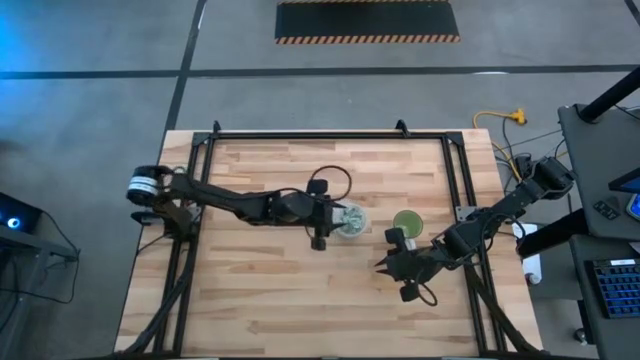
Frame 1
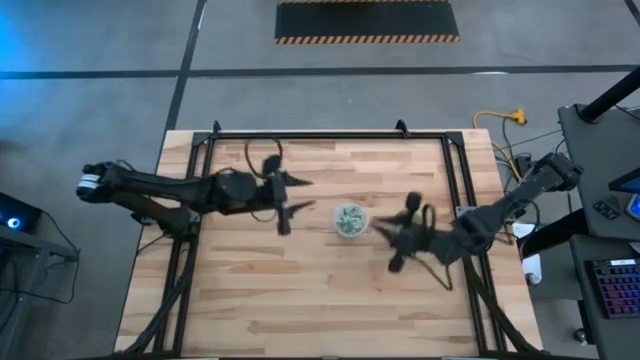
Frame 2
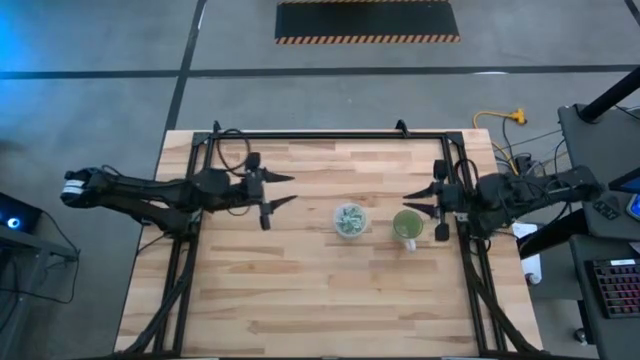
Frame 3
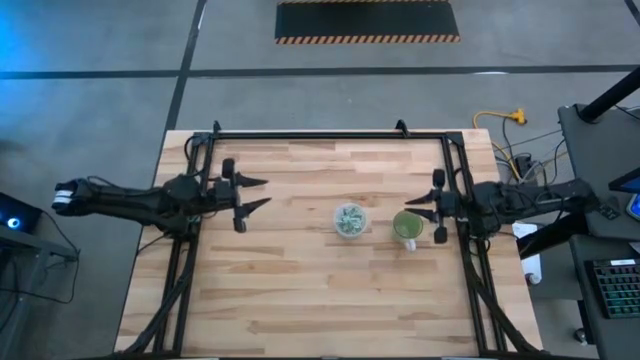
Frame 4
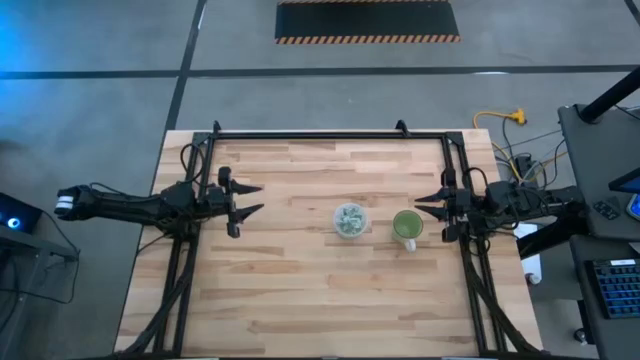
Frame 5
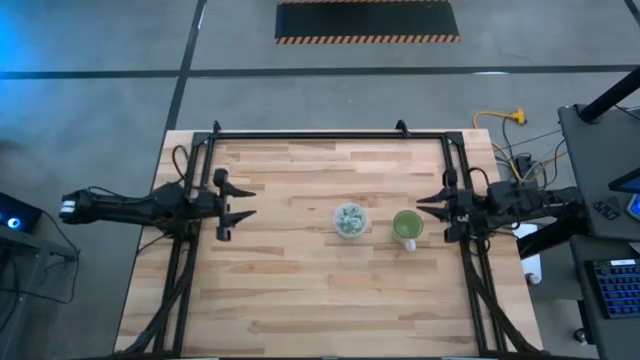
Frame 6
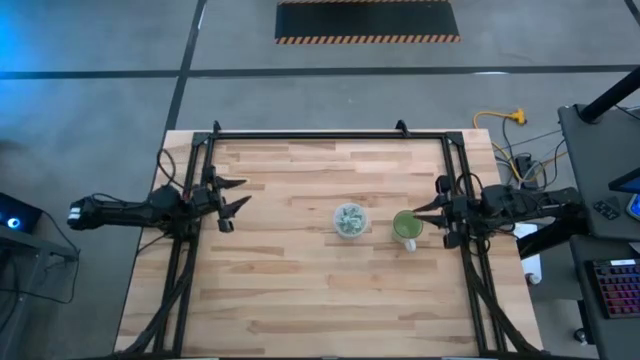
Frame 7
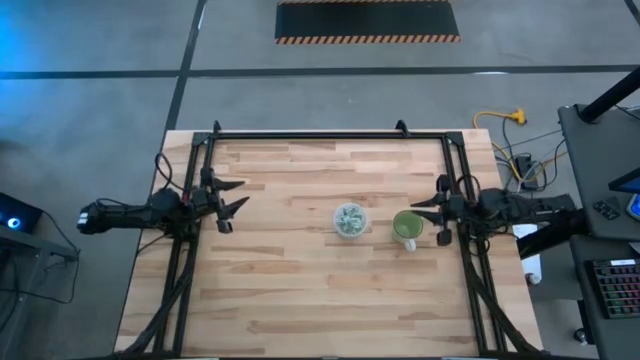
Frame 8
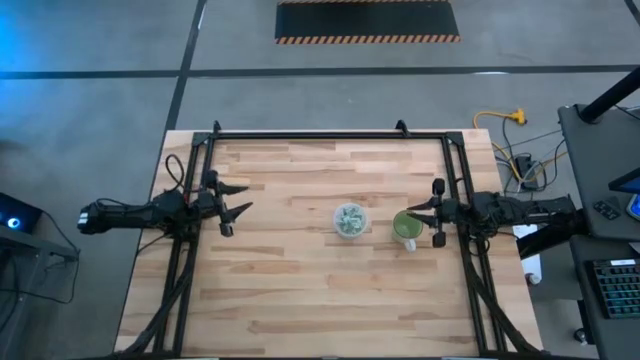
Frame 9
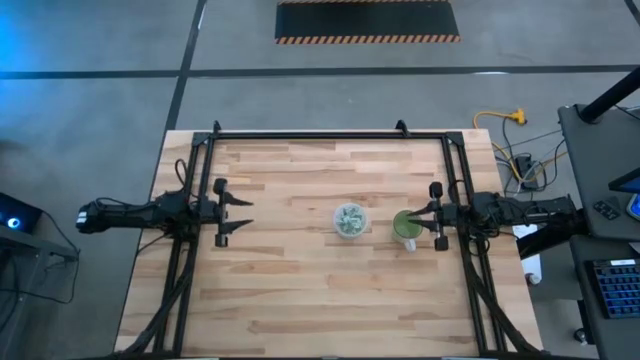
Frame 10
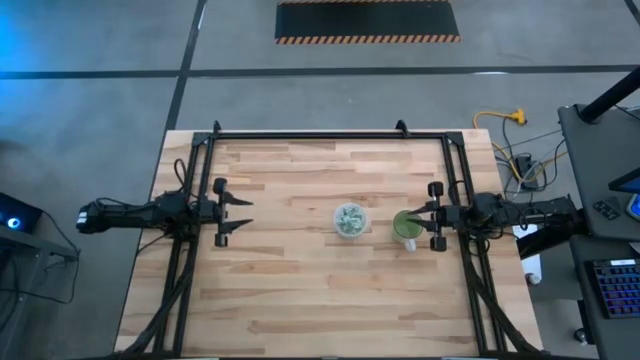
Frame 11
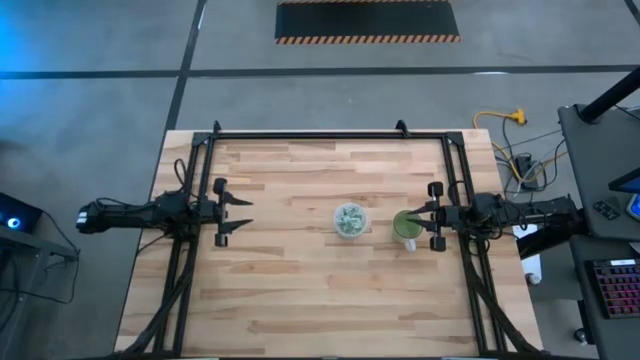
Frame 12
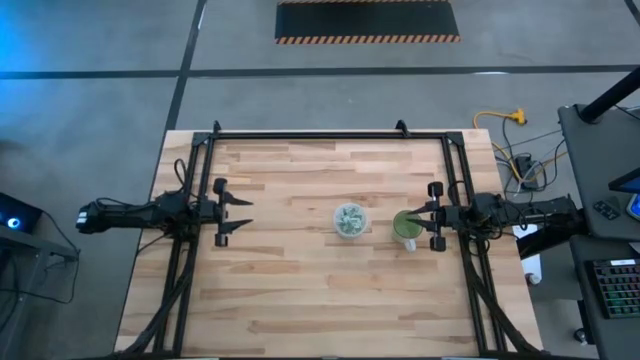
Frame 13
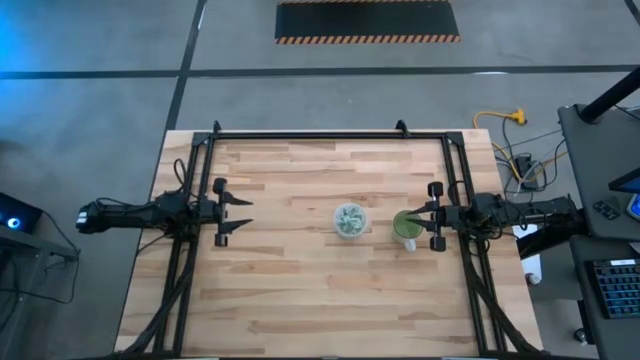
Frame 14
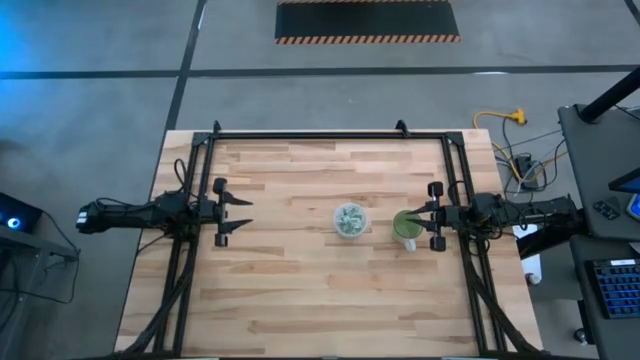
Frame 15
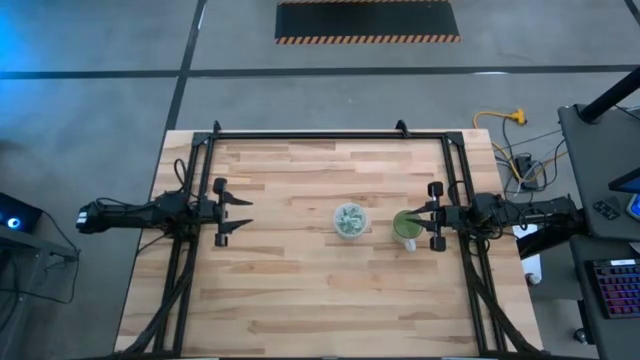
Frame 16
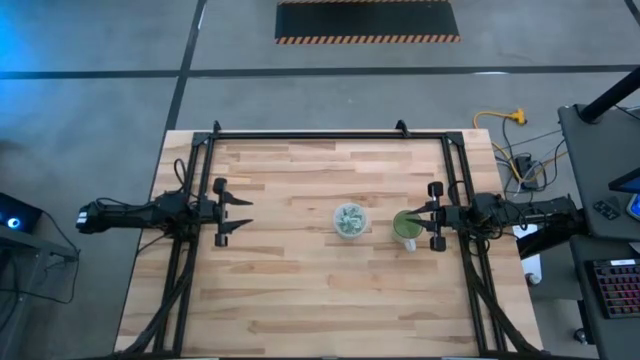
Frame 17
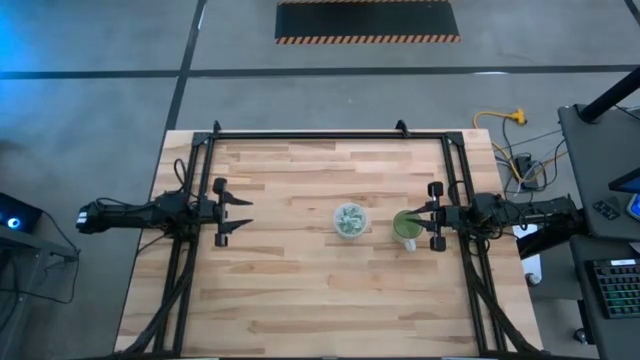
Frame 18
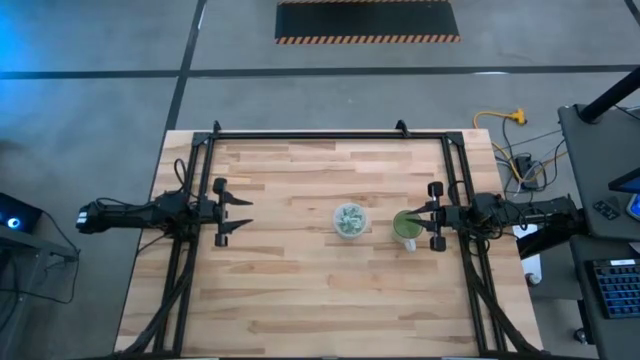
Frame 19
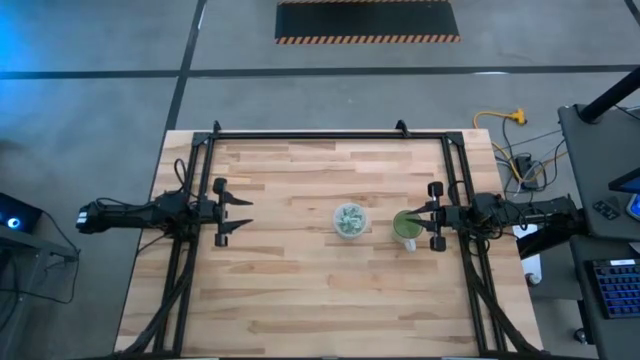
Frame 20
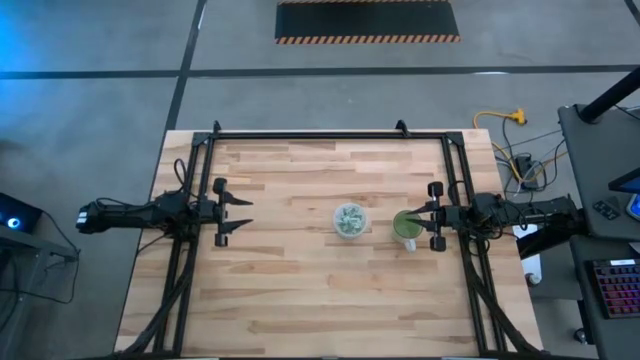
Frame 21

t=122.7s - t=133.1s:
Task: Pick and place Stevia / Truvia into bins
Return to Home Position

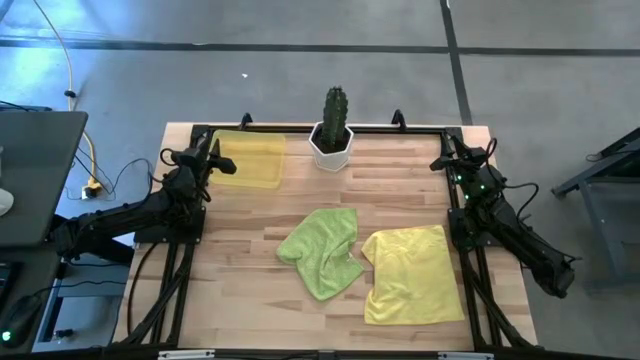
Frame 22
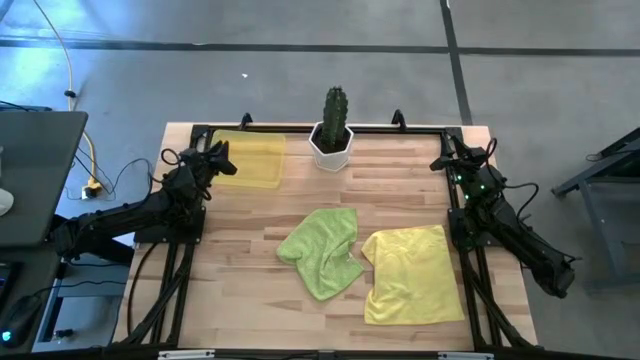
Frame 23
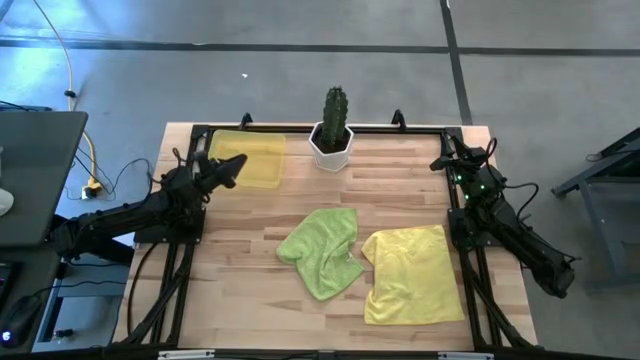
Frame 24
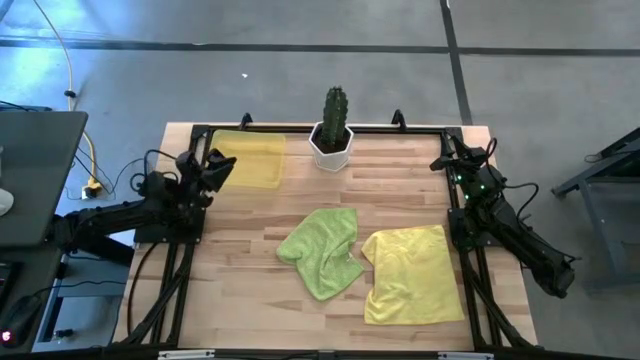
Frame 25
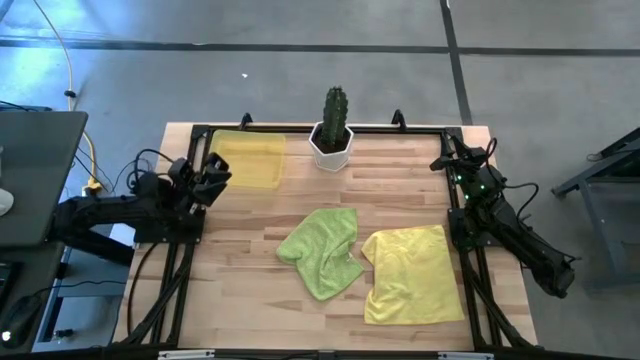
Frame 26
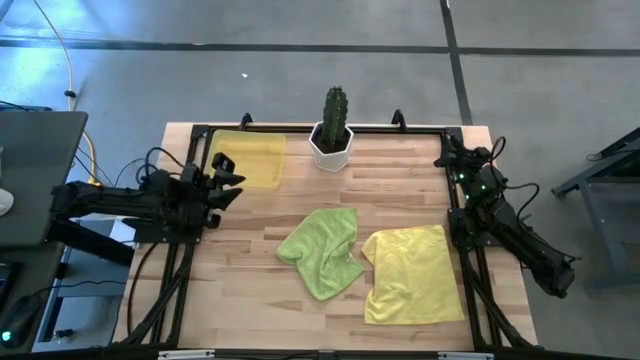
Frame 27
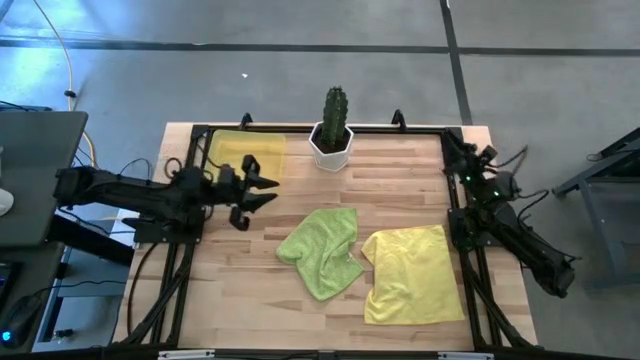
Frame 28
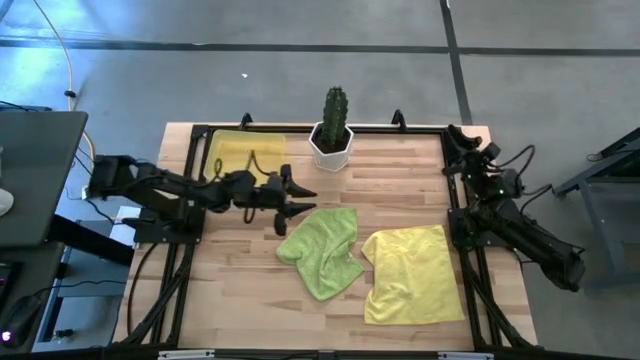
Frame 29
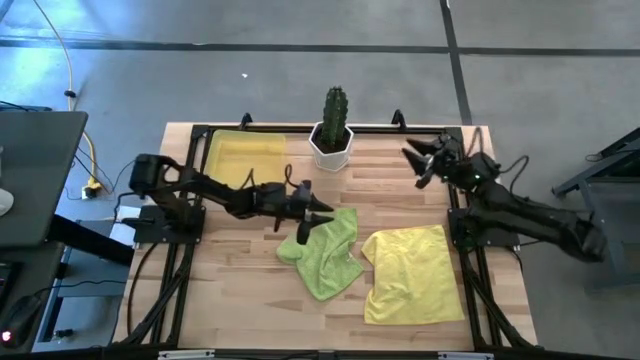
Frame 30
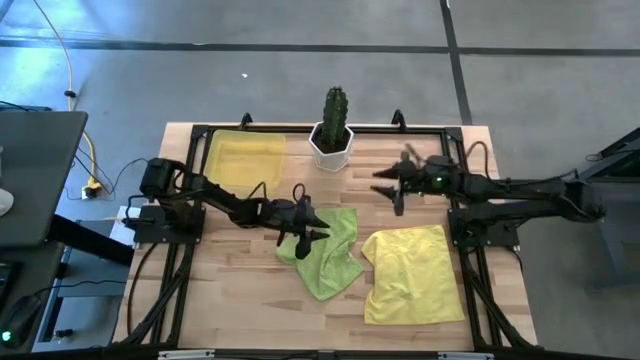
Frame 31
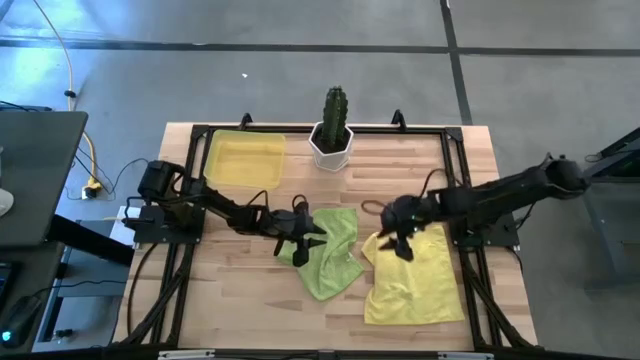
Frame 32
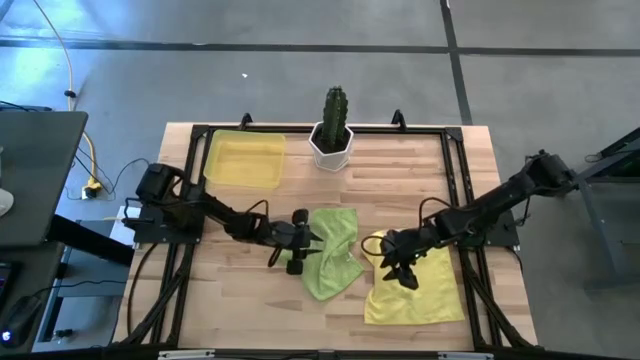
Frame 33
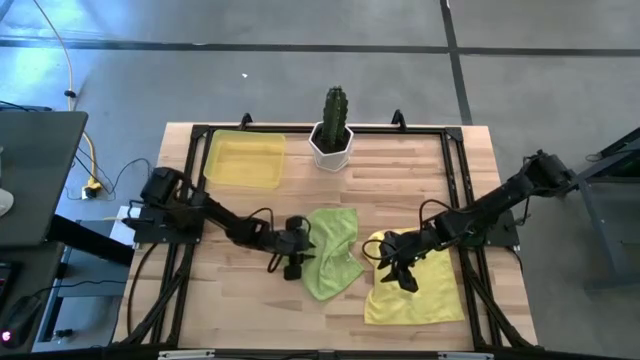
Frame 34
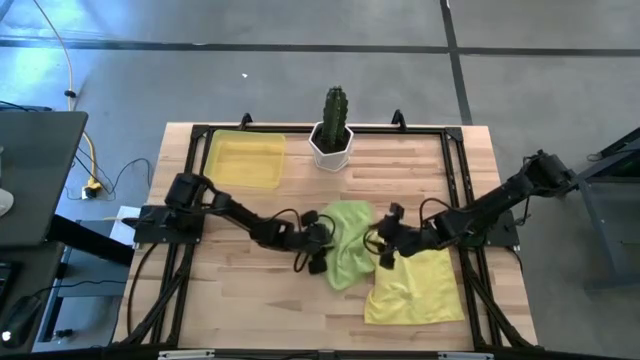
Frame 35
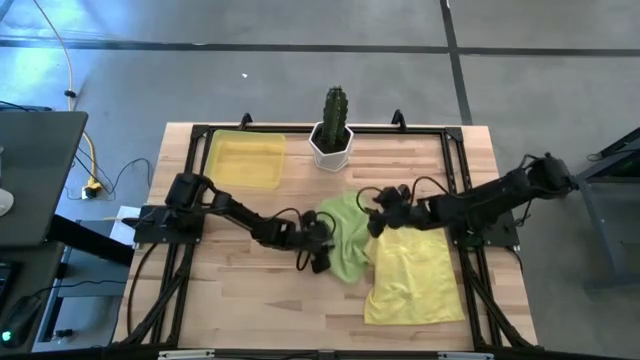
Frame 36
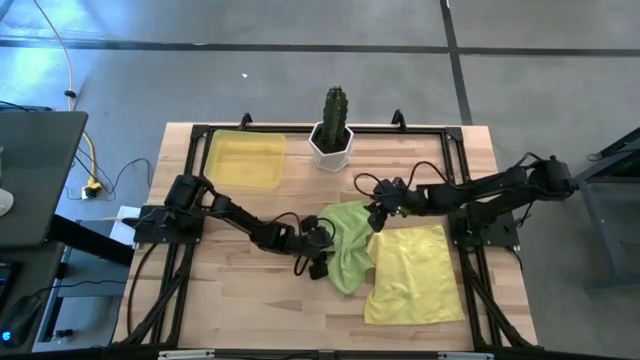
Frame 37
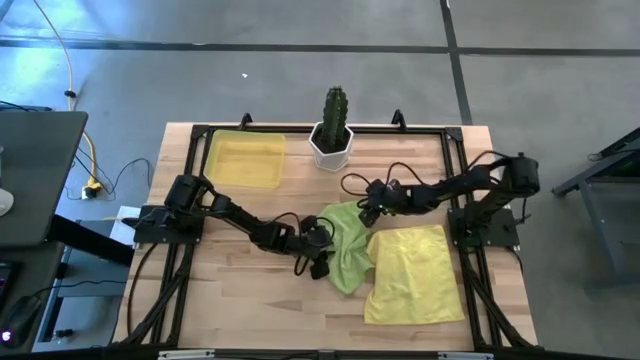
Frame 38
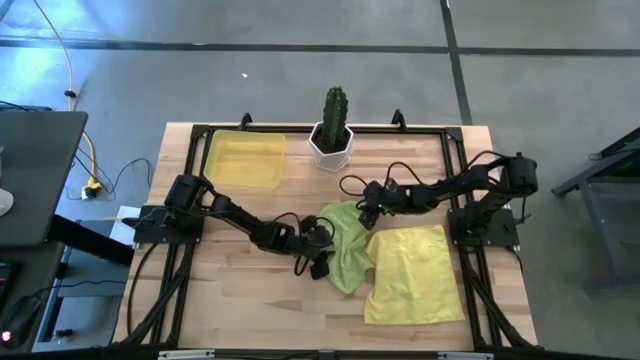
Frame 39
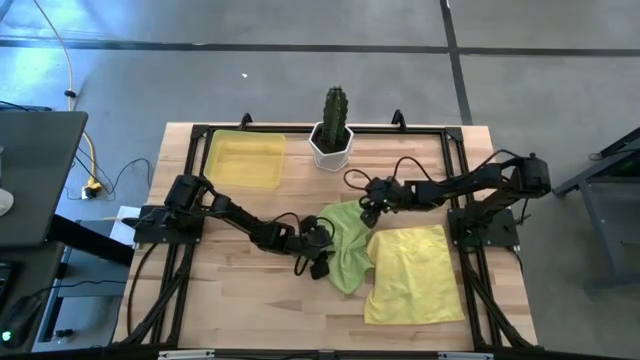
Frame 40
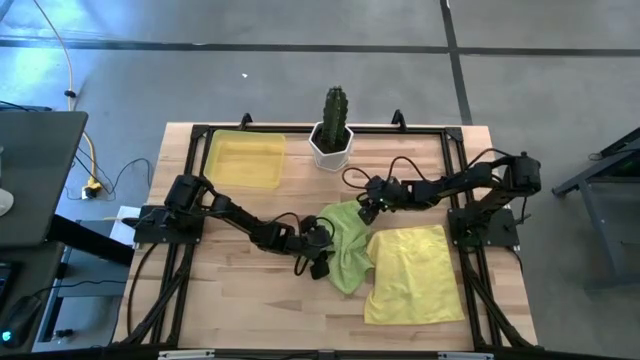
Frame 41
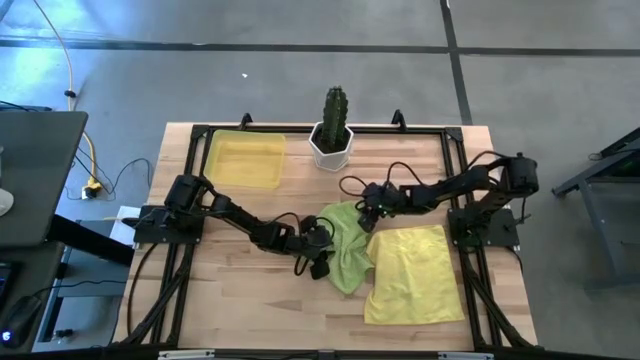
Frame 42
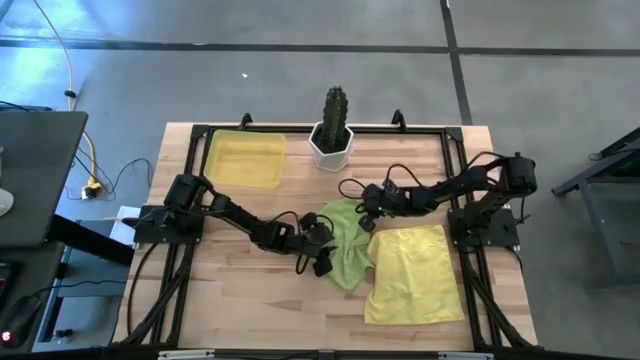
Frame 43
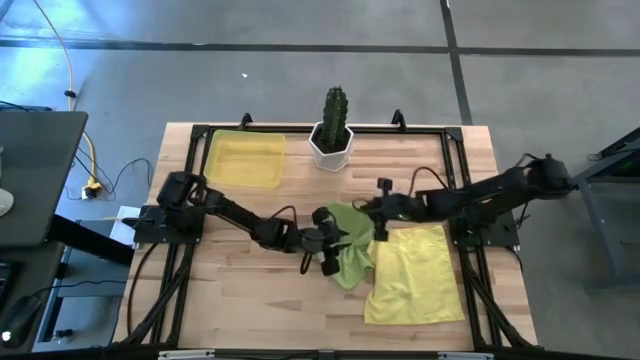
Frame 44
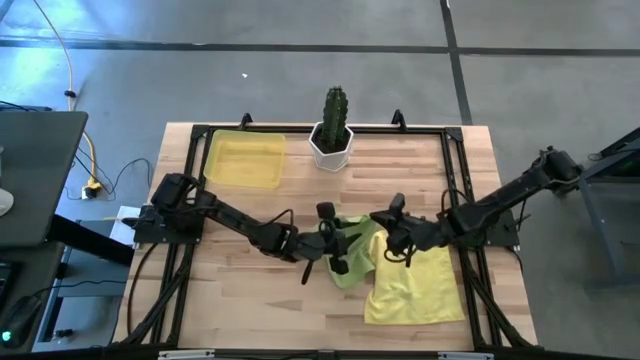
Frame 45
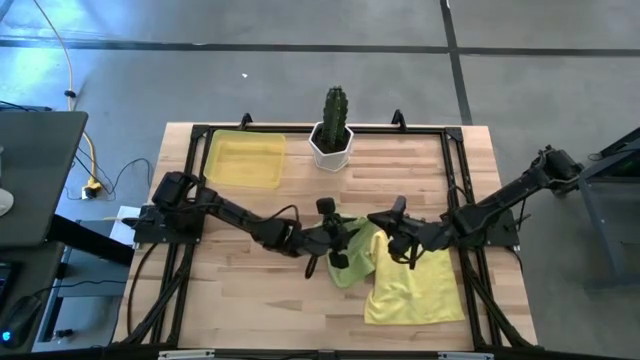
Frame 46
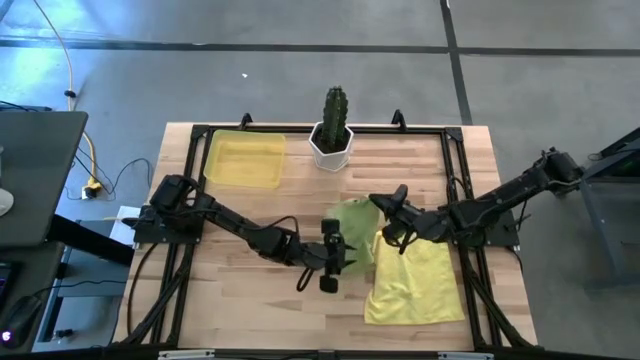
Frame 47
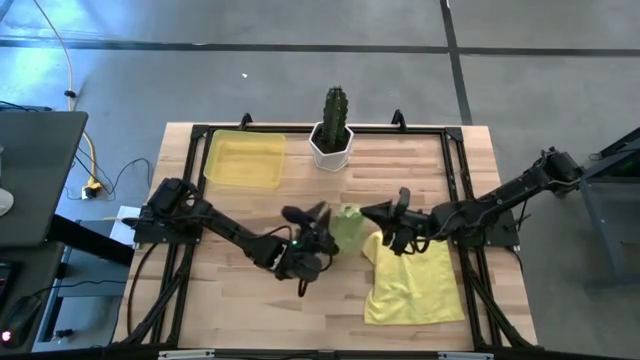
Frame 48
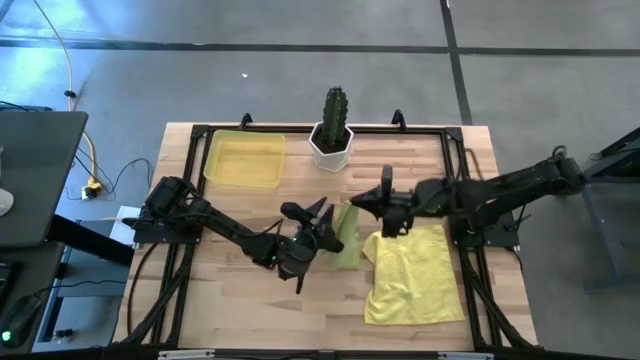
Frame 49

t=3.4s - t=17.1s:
Task: Roll microfiber towels into tight, uniform cylinder then place into a basket
Fold the green microfiber towel
